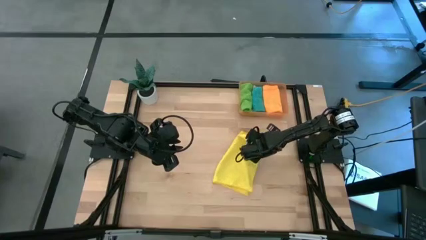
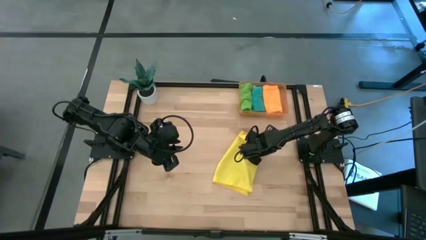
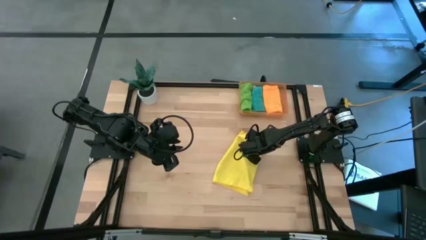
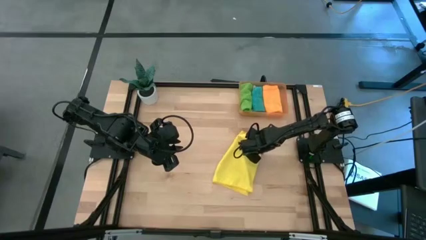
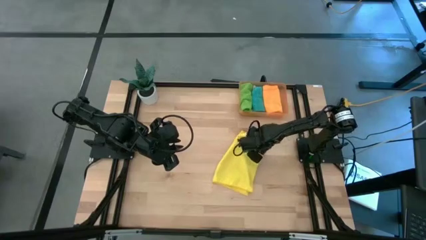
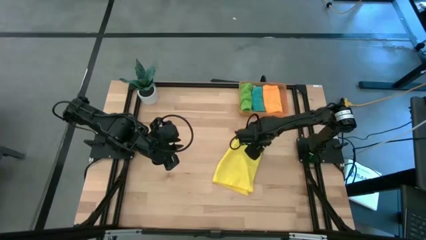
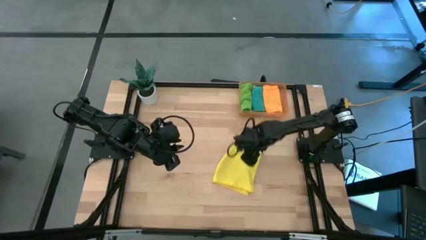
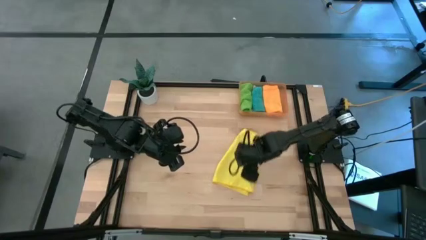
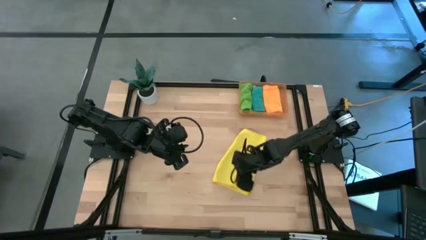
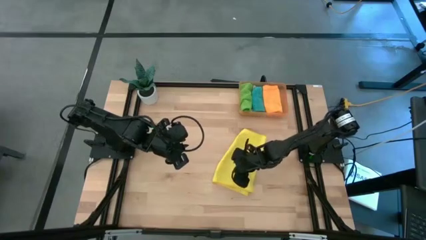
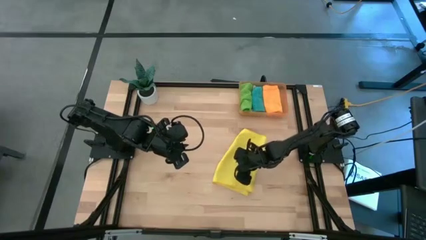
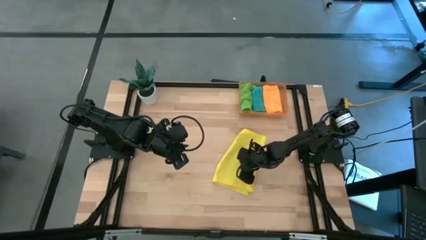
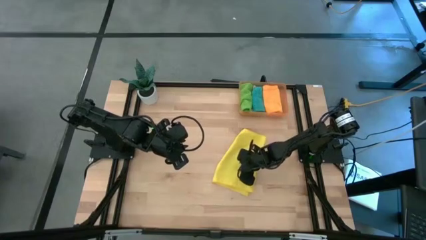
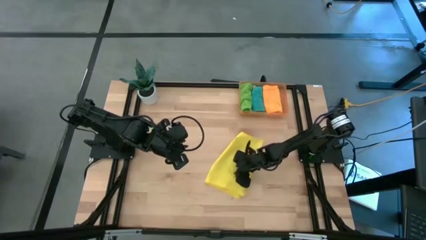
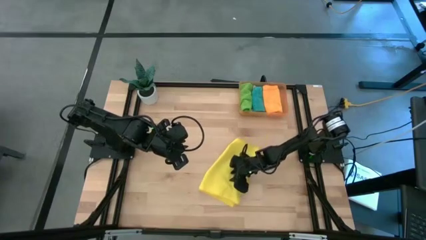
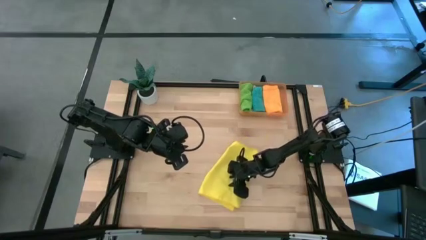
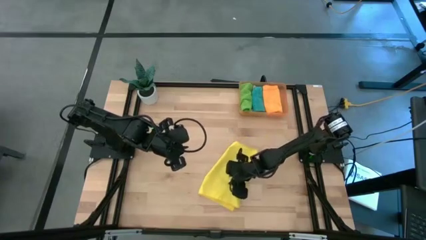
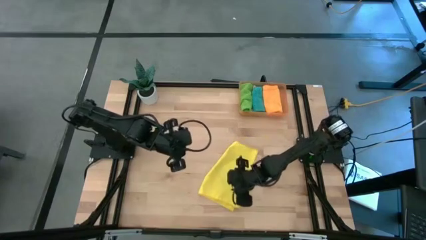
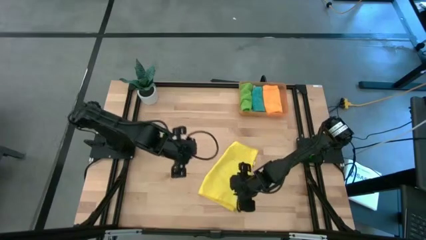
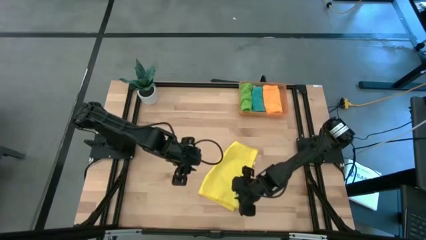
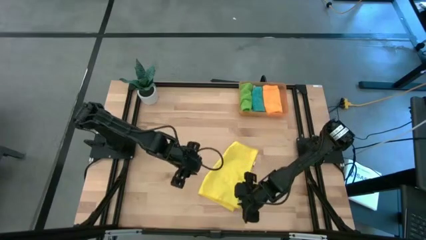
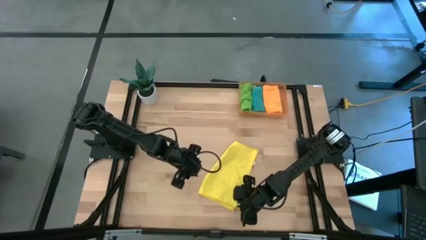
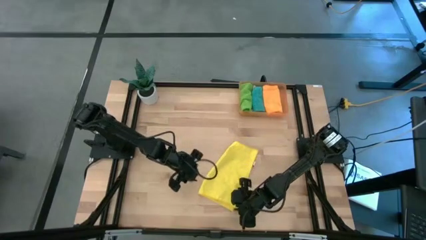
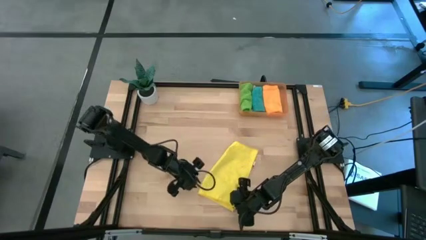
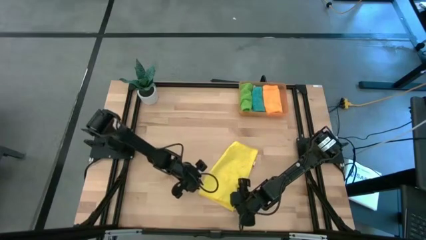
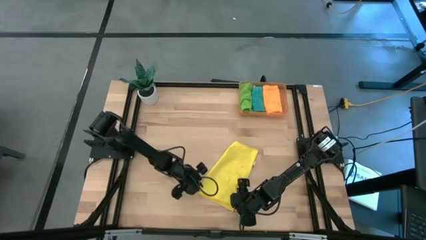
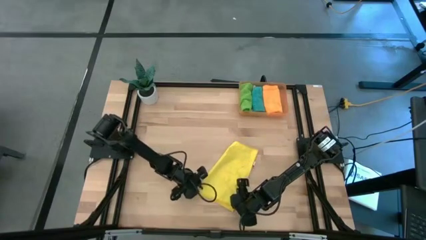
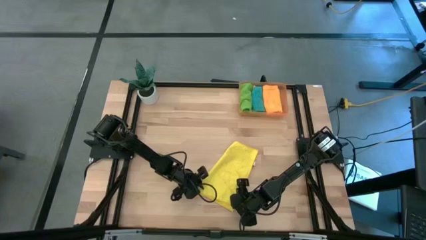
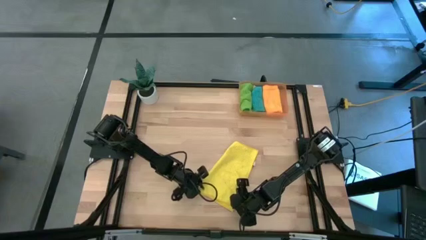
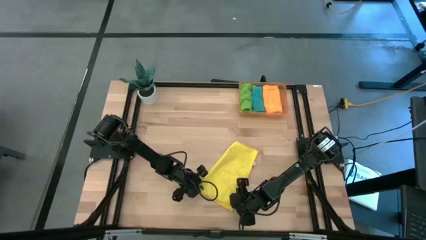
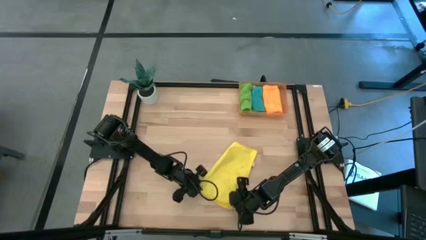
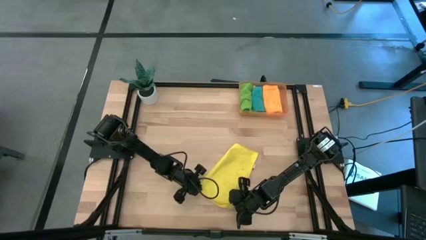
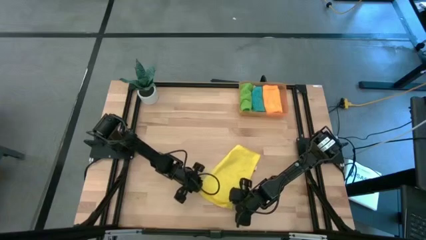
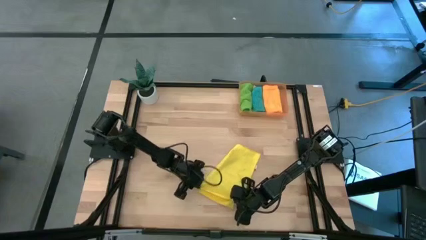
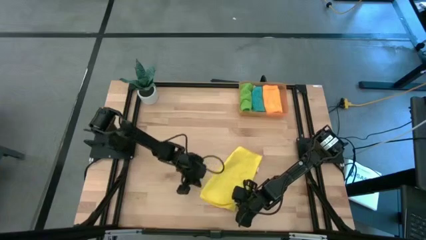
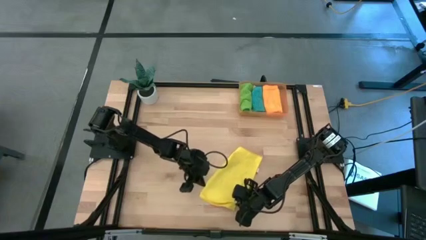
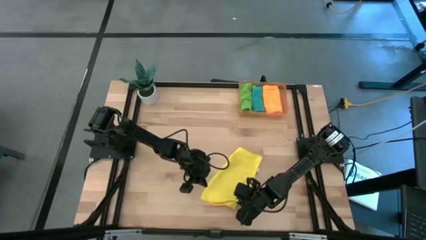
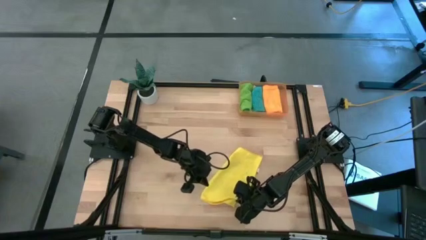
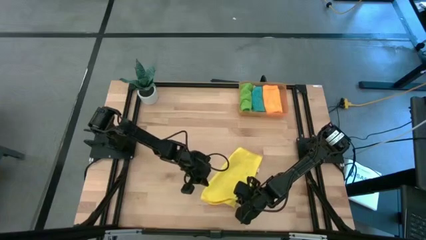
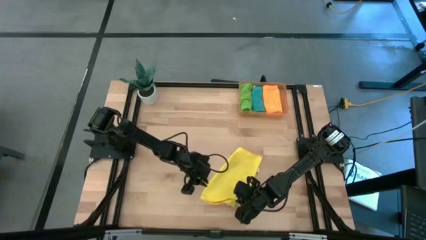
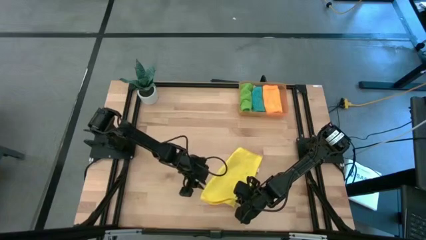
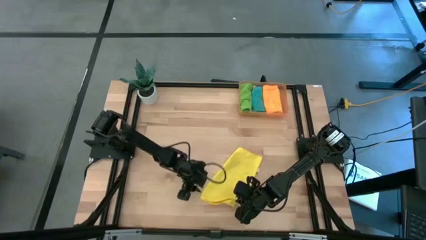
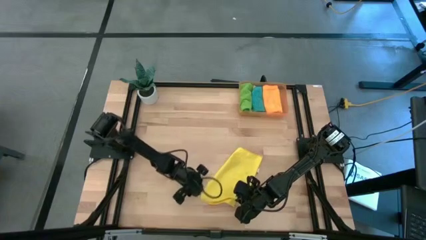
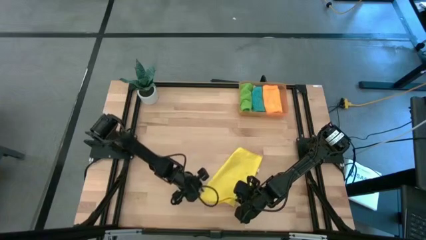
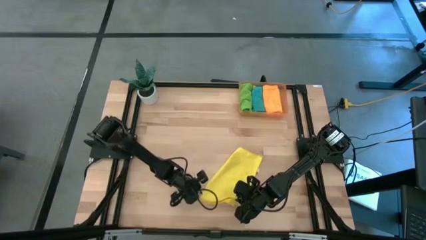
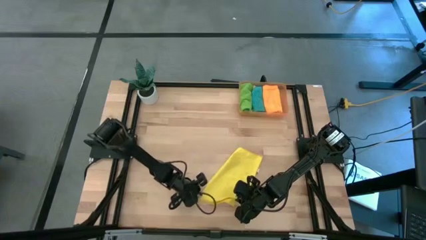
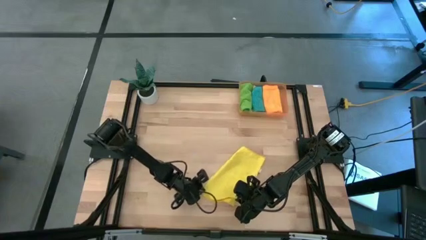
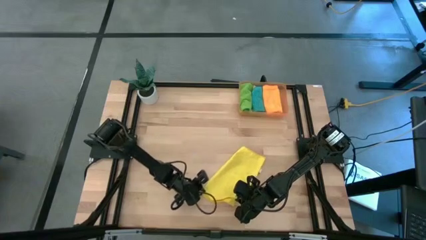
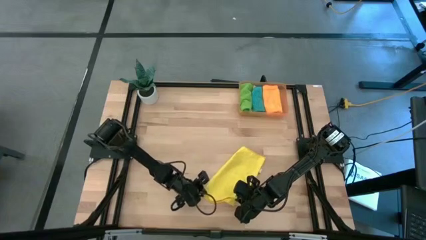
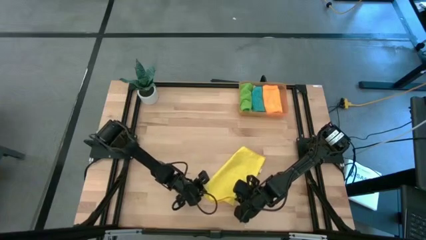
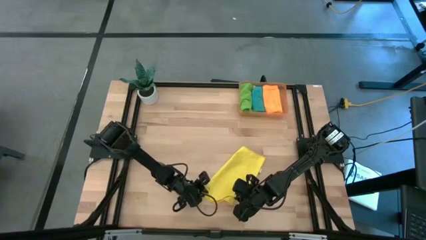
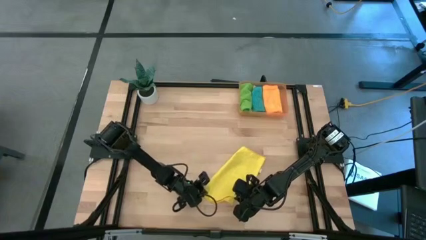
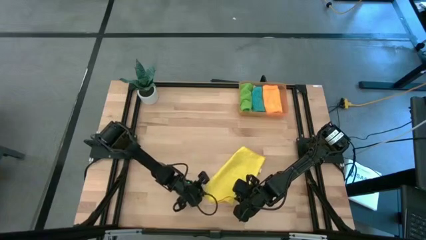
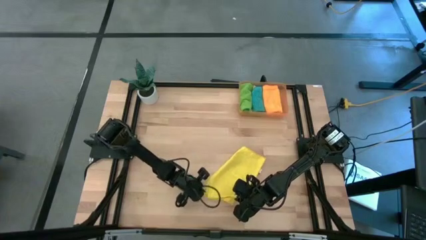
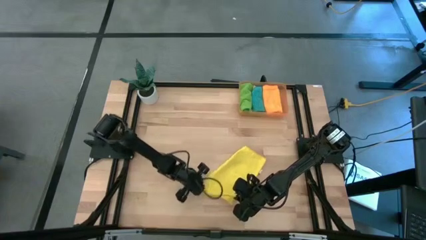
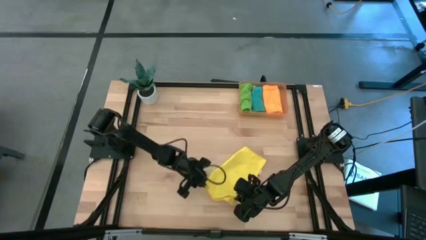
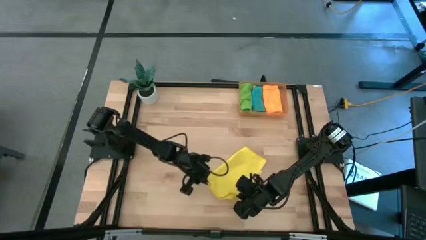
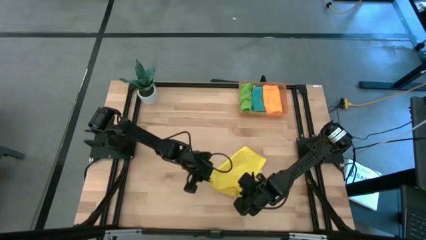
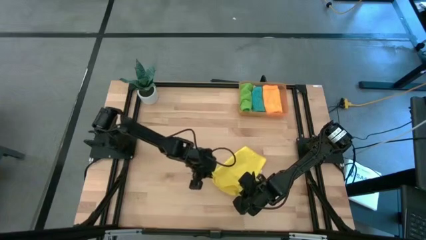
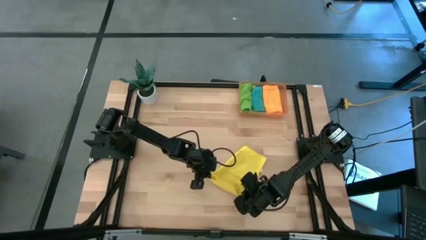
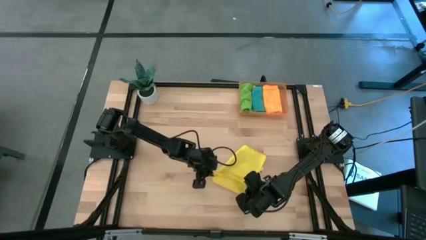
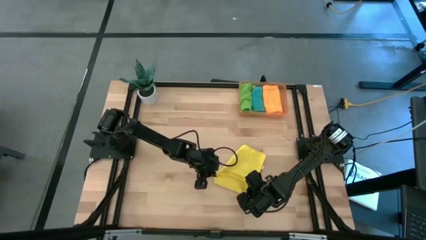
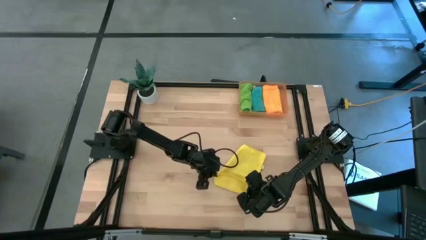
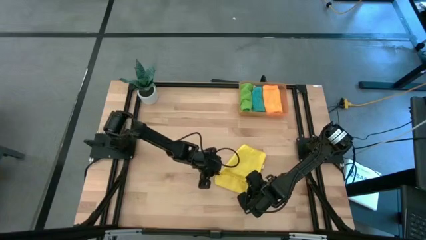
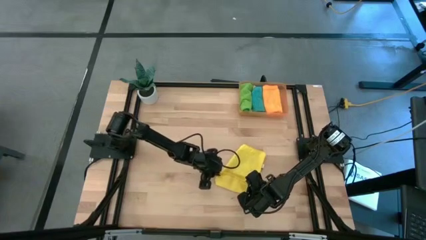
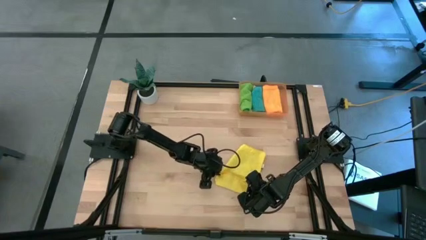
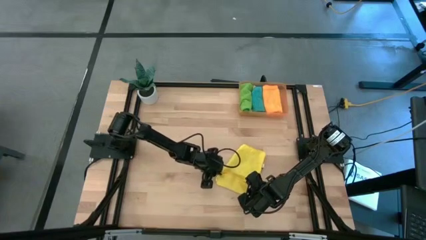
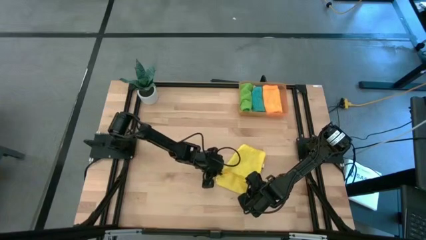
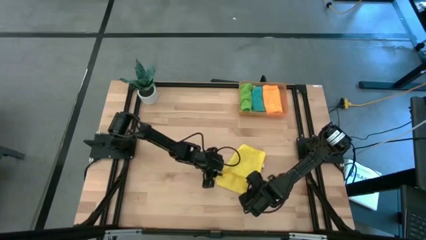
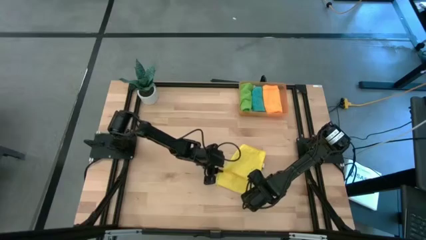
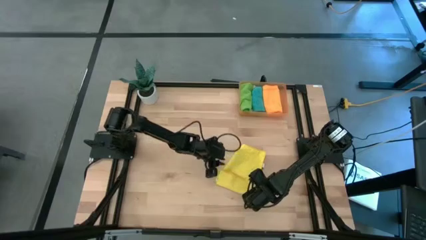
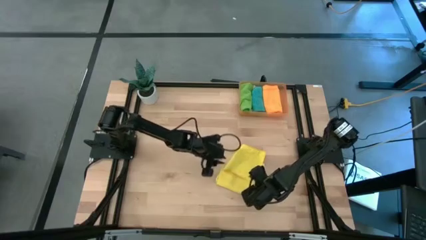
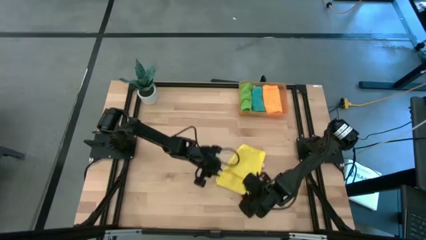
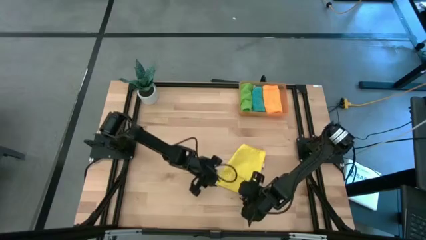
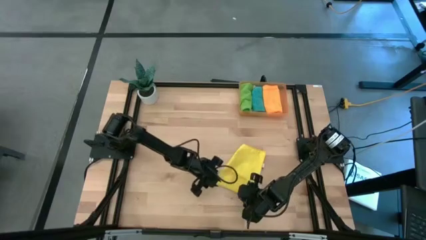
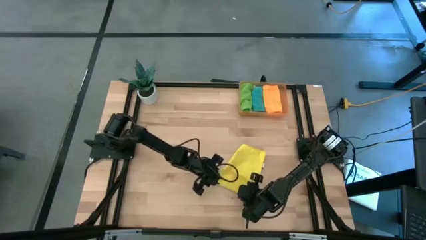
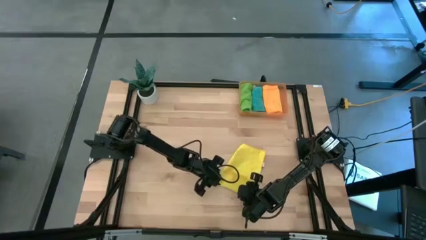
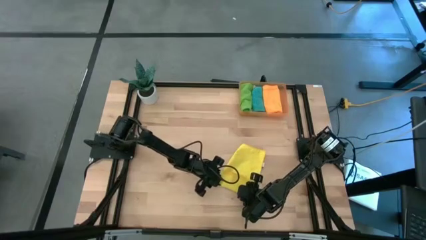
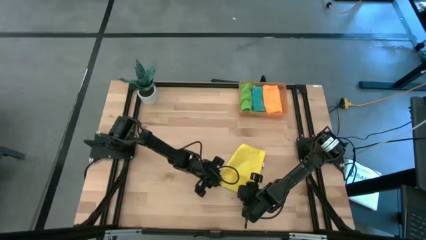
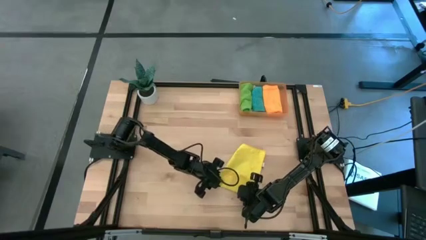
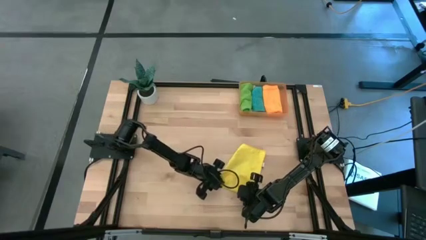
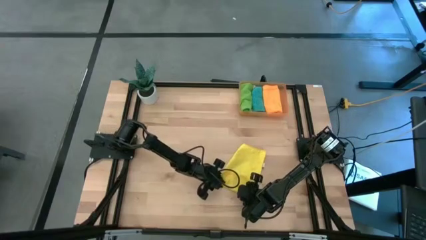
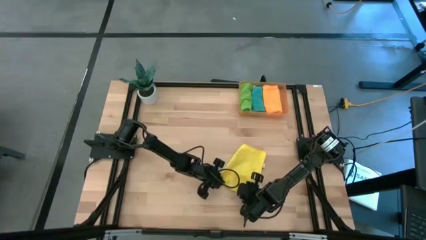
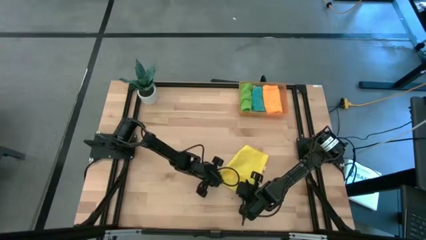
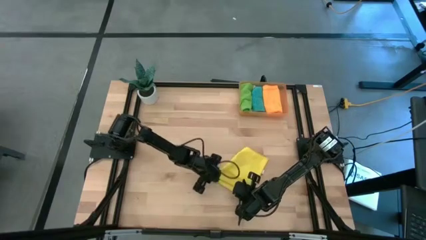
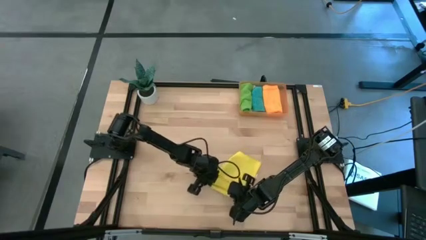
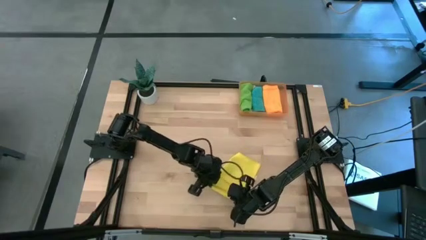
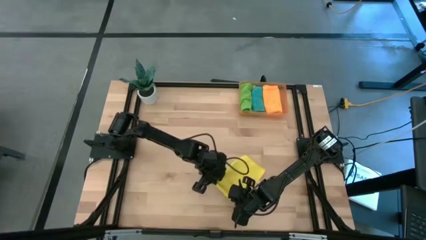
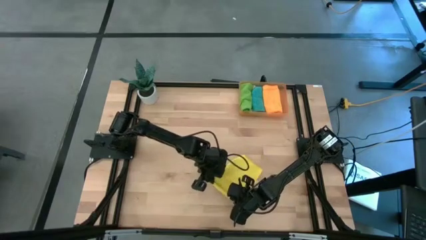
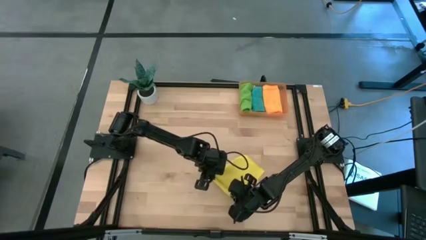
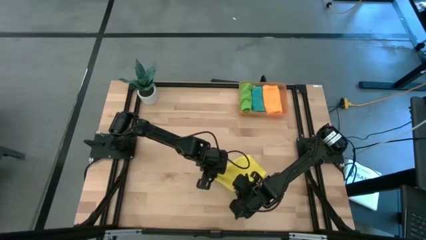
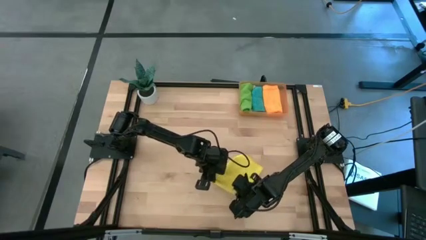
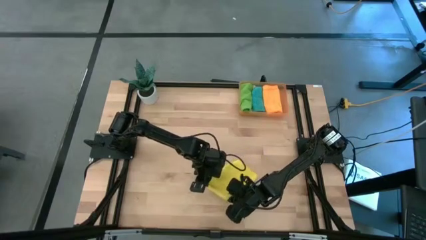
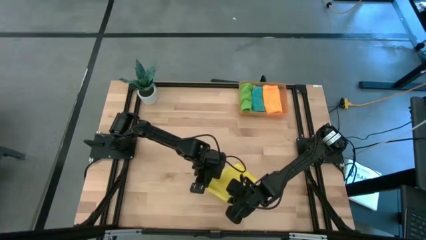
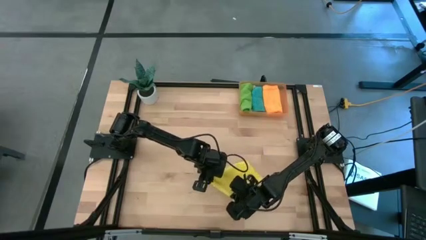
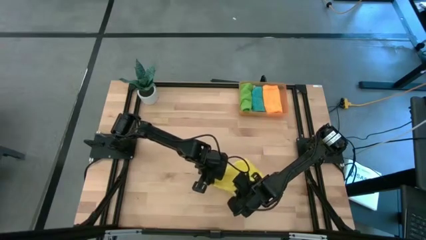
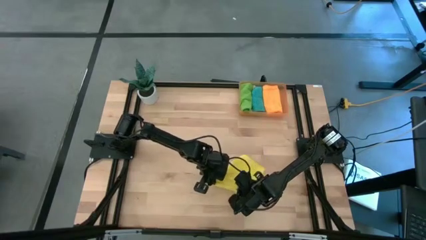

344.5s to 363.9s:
Task: Roll microfiber towels into tight, uniform cylinder then place into a basket
Fold the yellow towel
